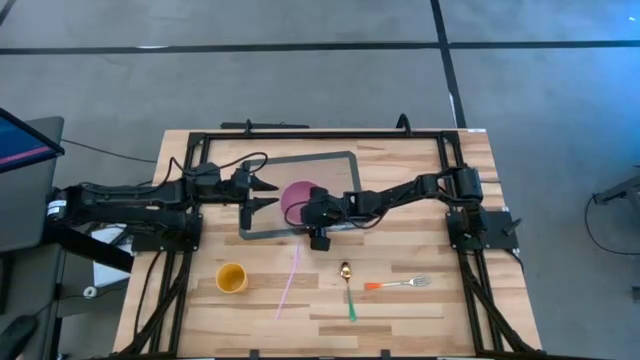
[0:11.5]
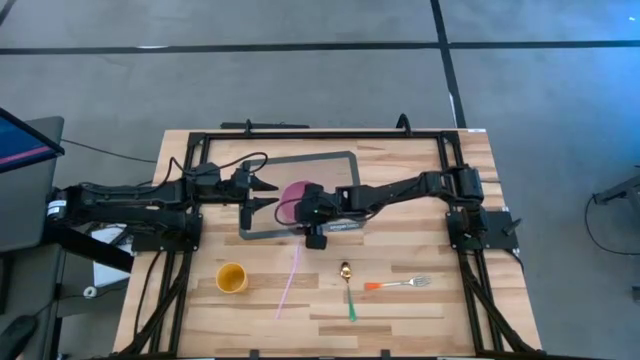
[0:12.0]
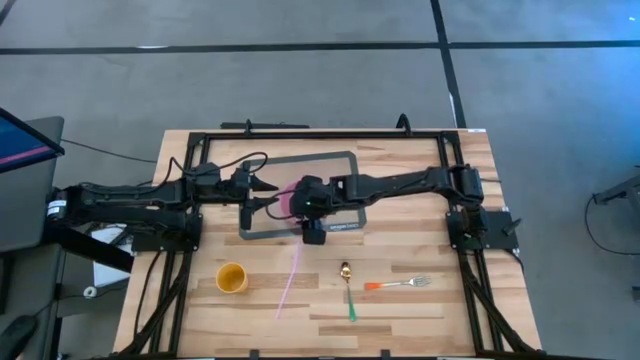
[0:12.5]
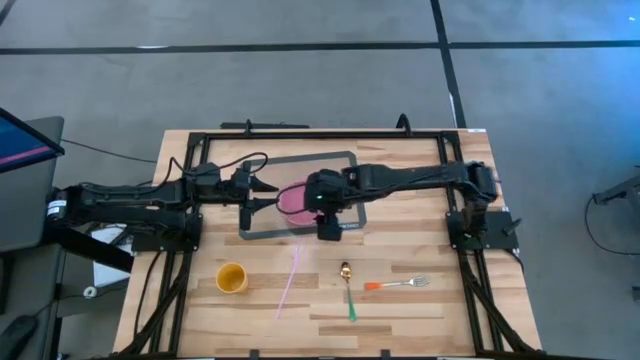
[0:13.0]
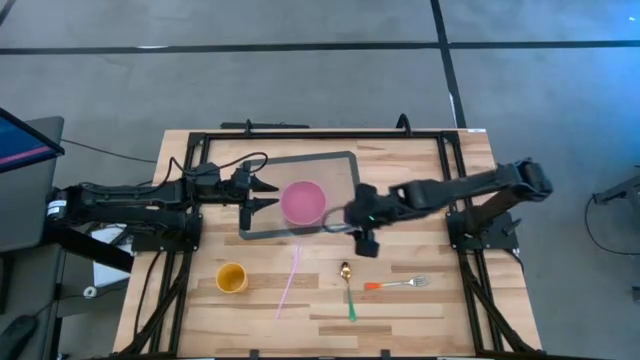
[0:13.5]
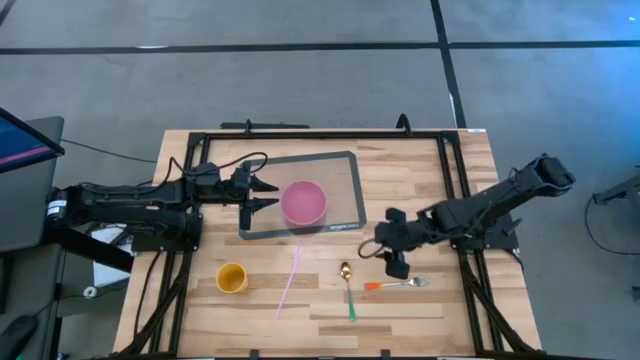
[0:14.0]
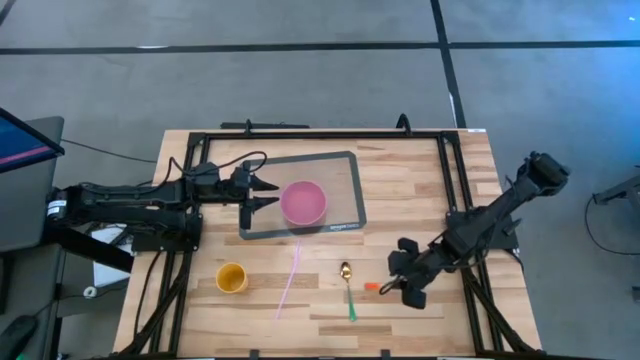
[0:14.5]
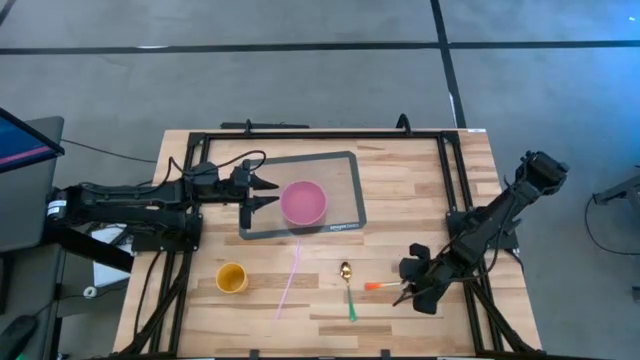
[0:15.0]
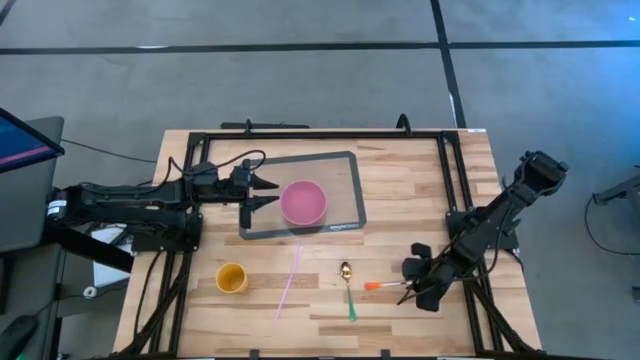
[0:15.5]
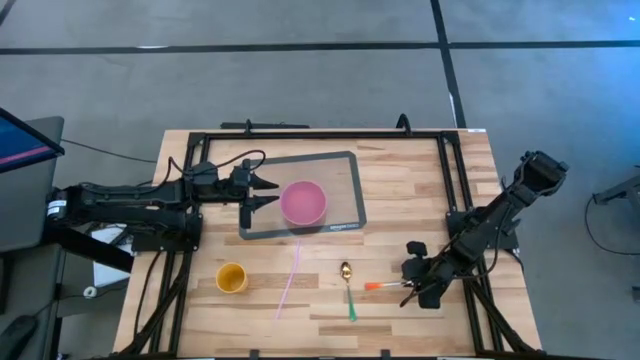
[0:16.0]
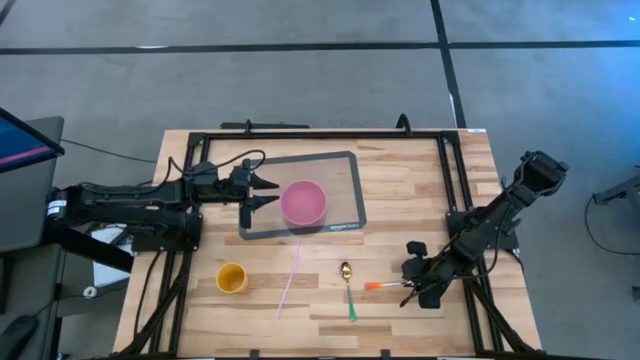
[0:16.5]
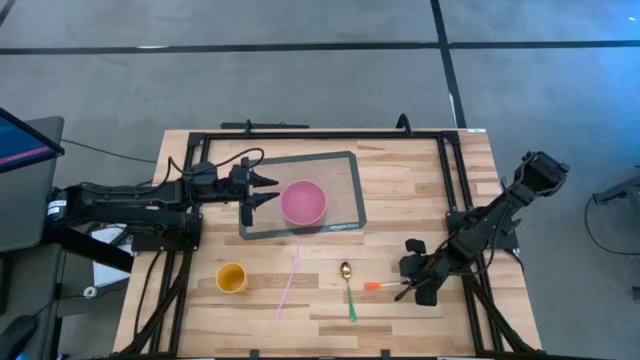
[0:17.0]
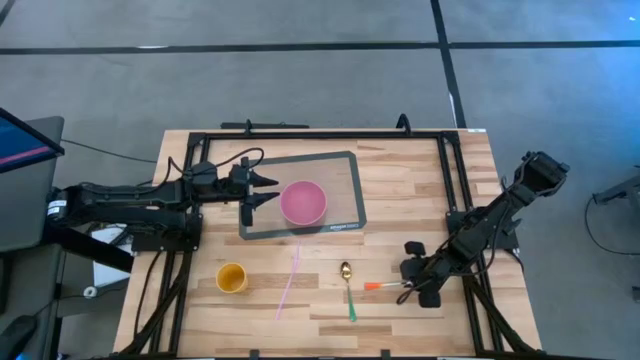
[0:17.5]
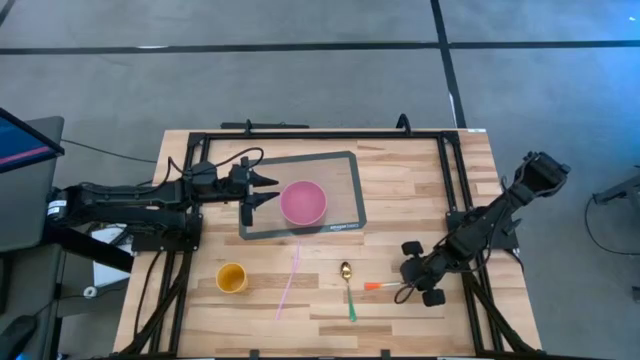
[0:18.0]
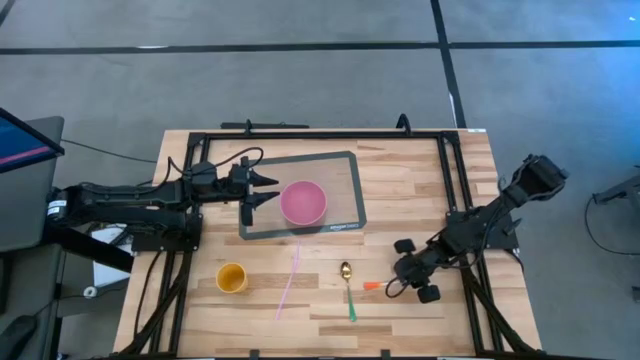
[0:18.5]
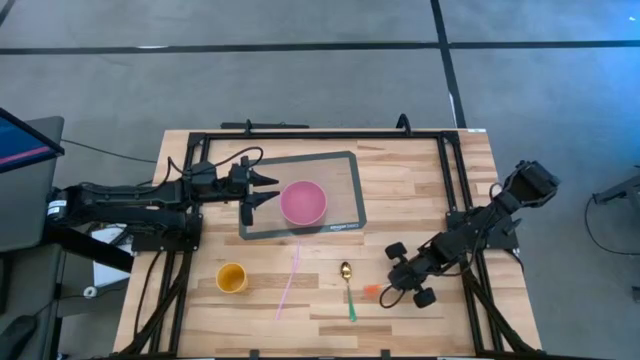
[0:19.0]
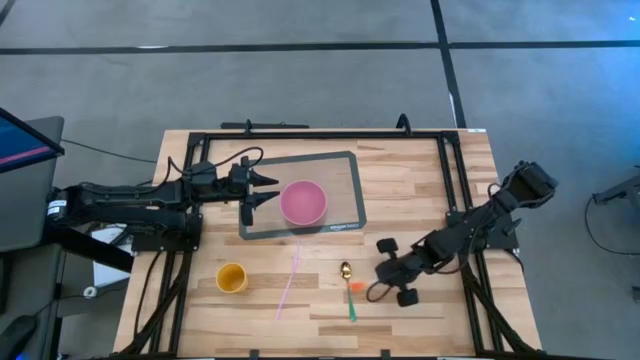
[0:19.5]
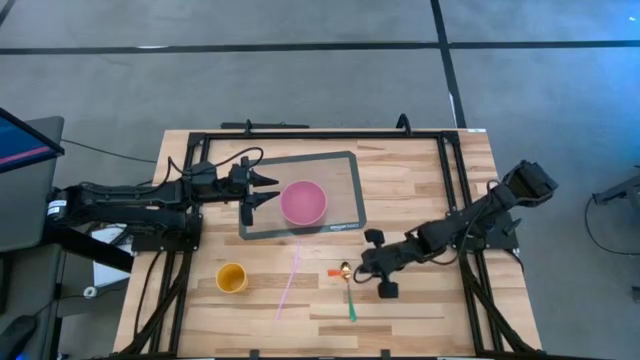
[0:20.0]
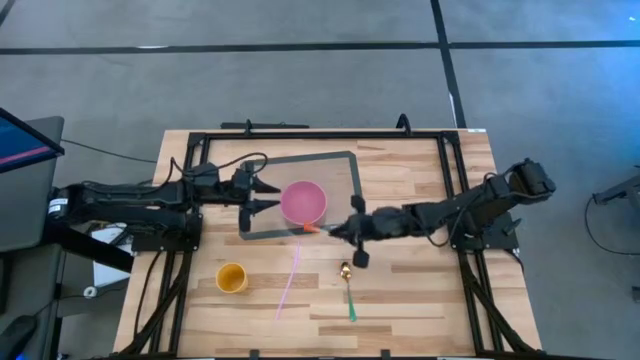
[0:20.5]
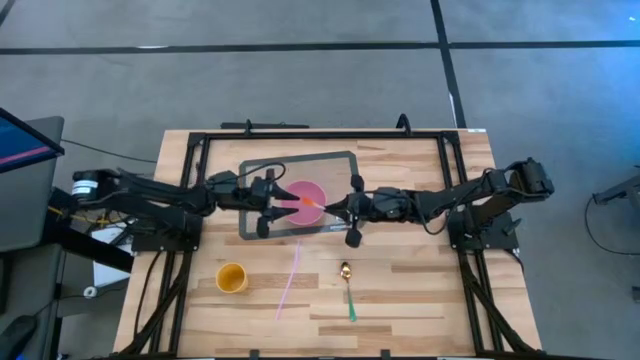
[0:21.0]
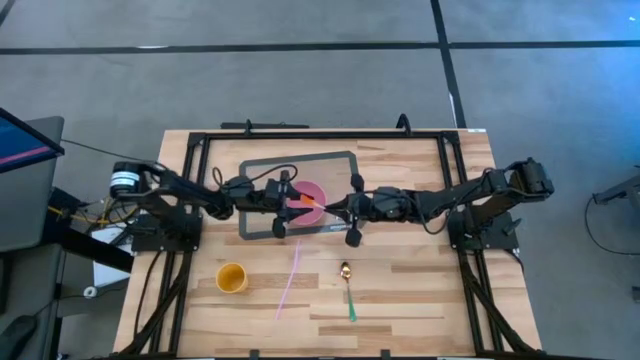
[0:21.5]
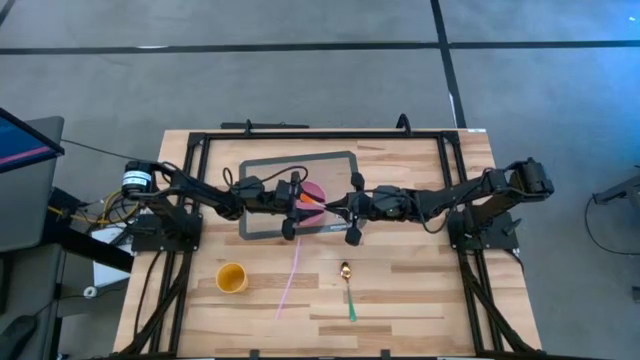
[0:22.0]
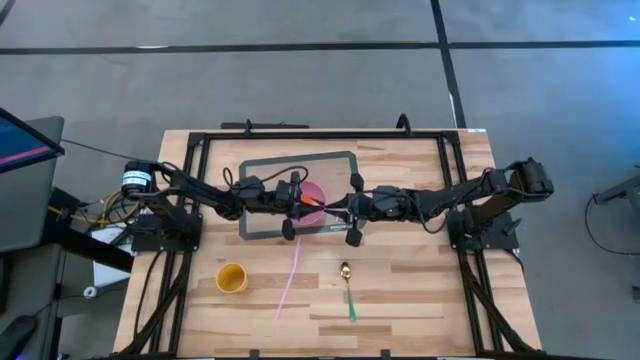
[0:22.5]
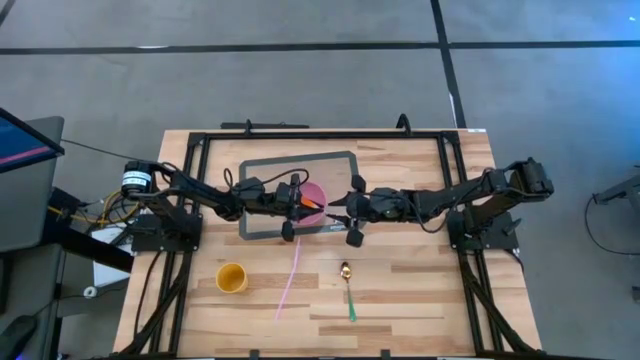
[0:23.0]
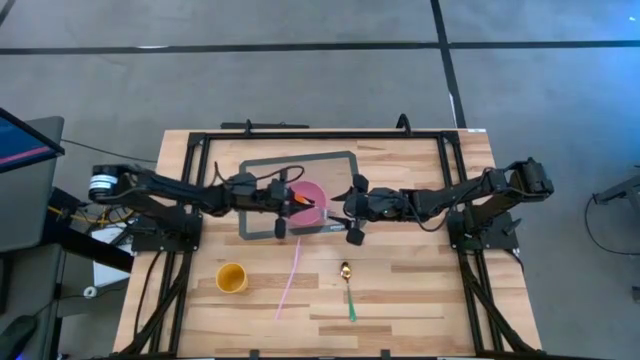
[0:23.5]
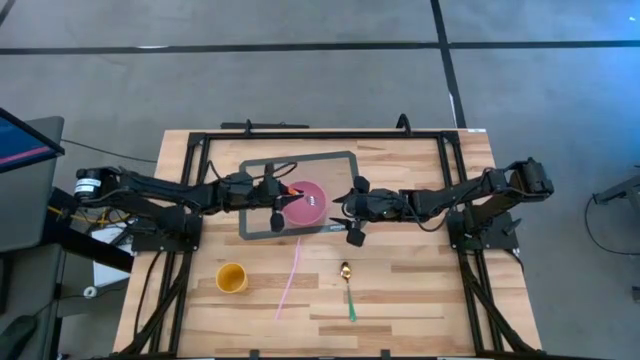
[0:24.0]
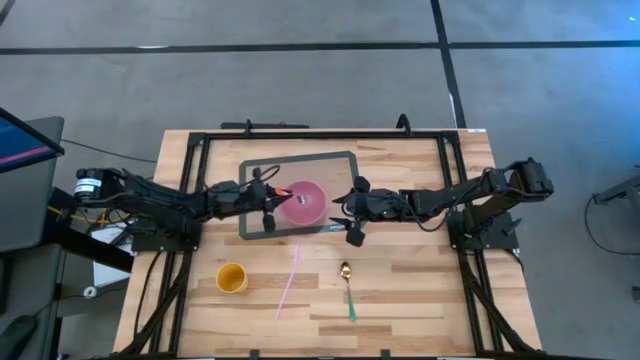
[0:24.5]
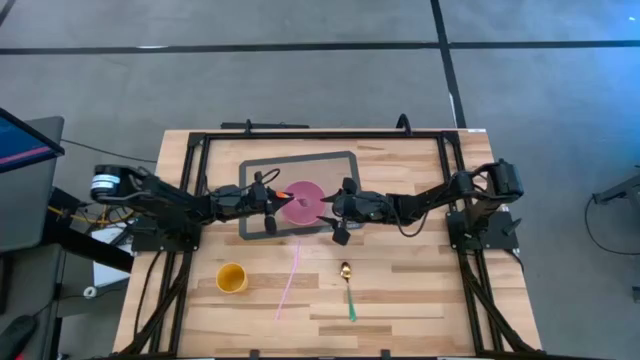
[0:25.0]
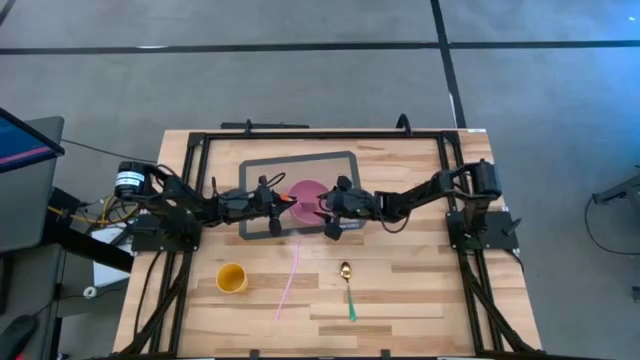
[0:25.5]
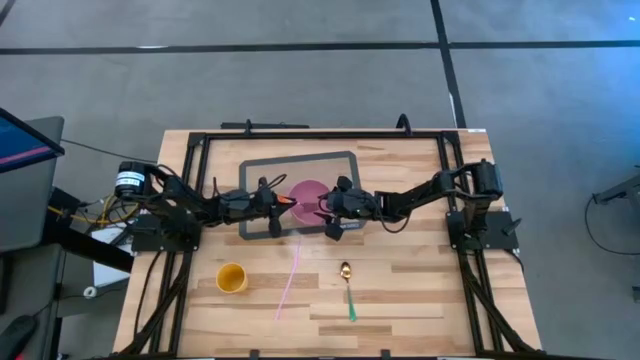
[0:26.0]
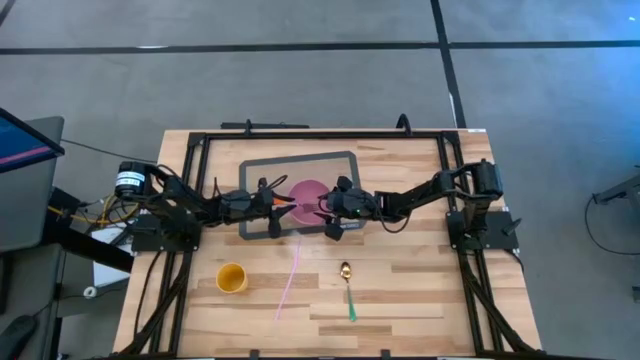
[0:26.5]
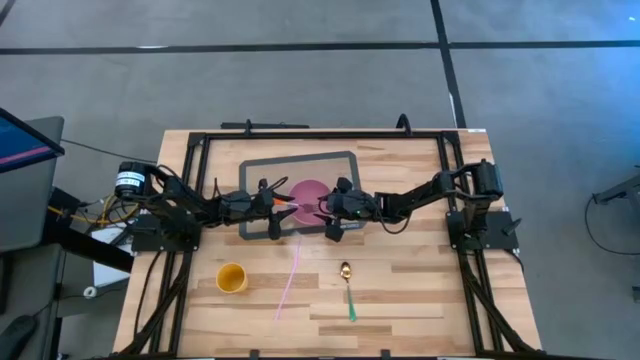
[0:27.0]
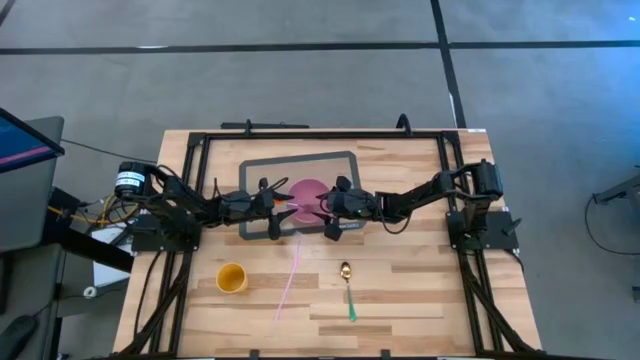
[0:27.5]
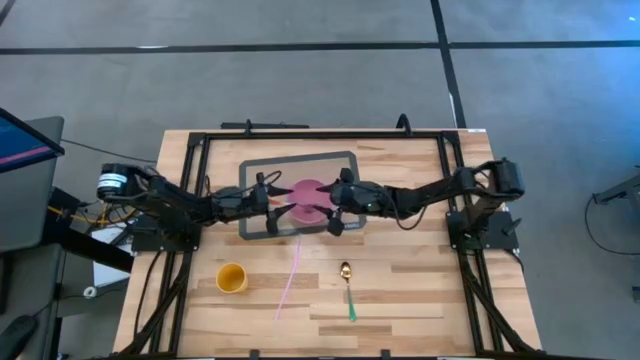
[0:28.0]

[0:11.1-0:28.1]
Task: Pick & Place Utensil
Put the orange fork into the pink bowl on the transparent mat

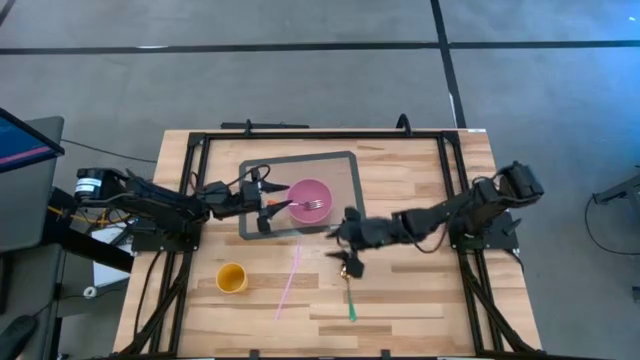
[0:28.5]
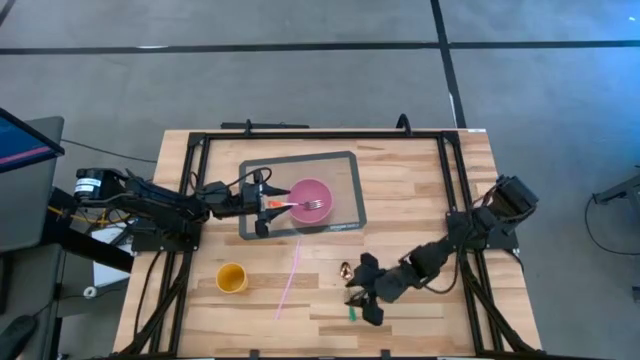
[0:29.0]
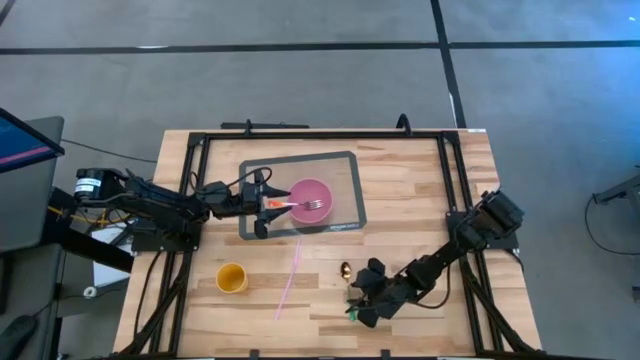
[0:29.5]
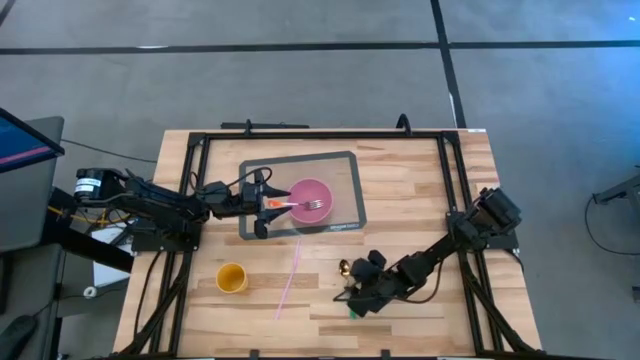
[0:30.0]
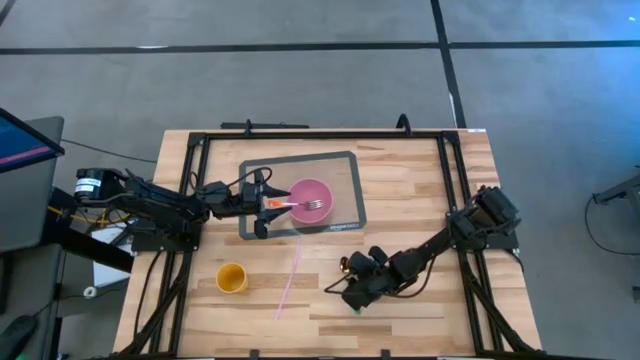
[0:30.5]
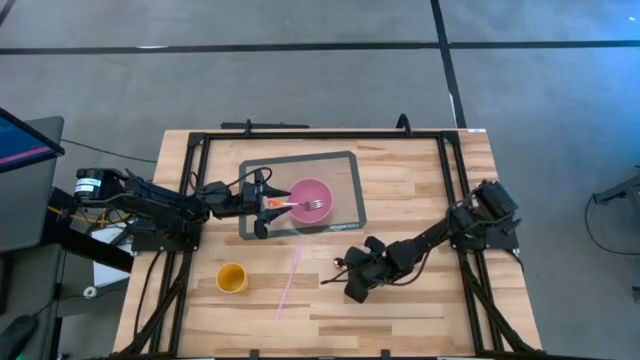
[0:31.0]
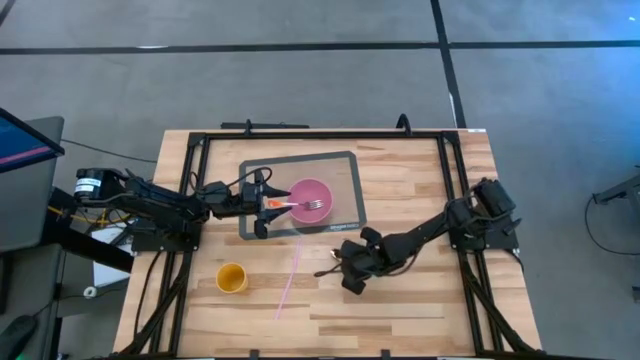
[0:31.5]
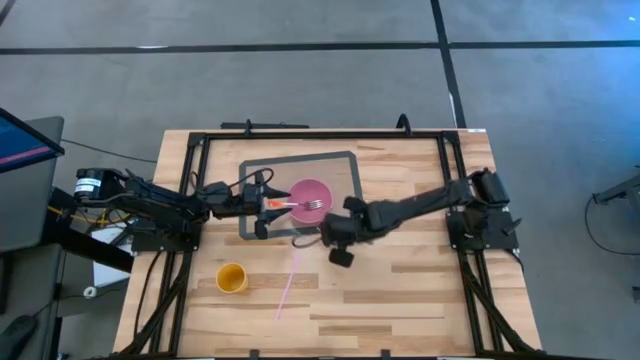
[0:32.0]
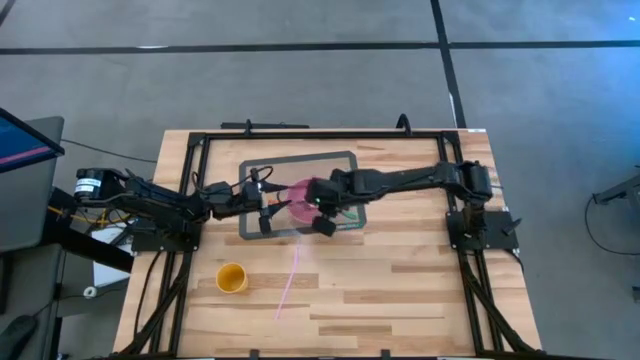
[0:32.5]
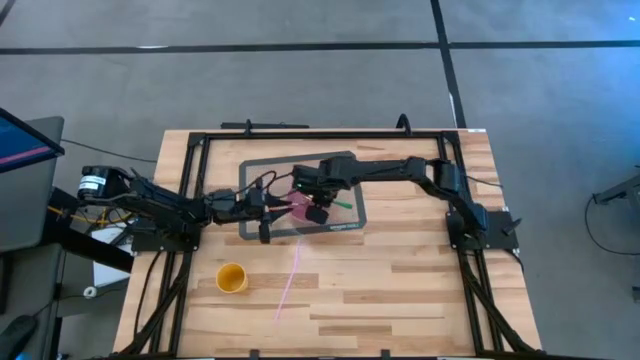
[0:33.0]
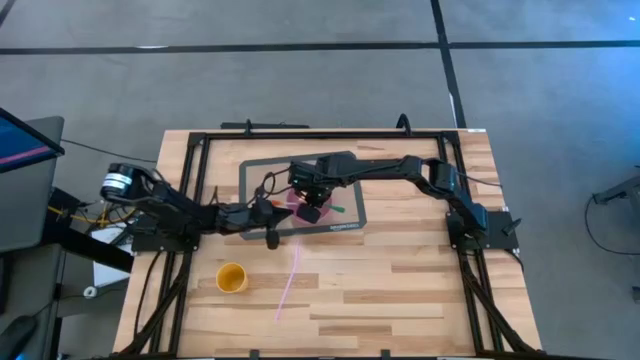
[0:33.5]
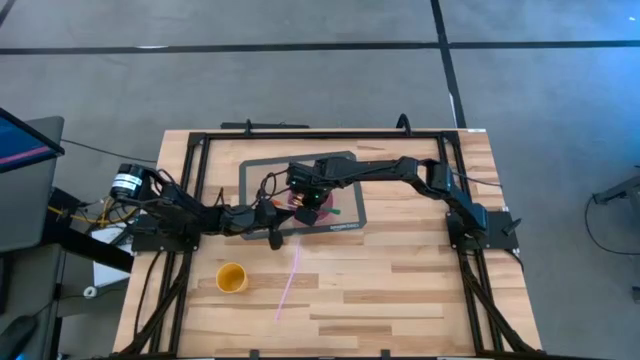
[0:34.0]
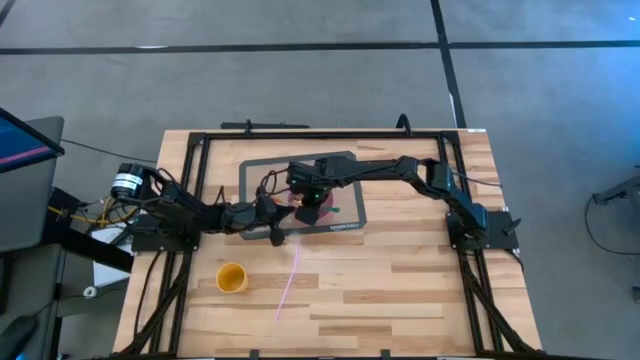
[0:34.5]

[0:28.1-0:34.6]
Put the green spoon into the pink bowl on the transparent mat
